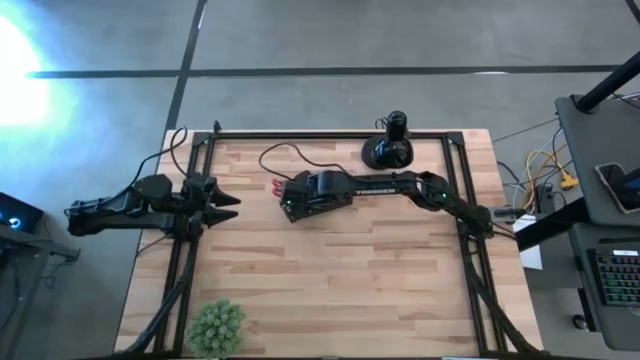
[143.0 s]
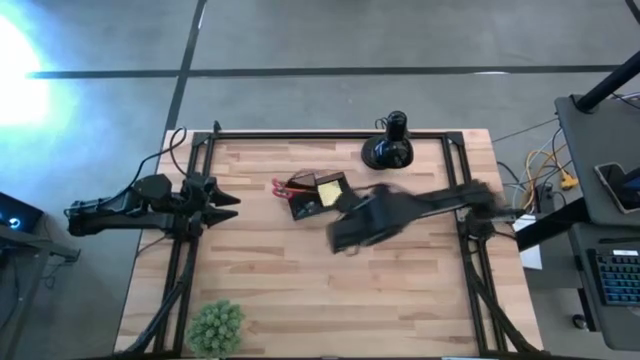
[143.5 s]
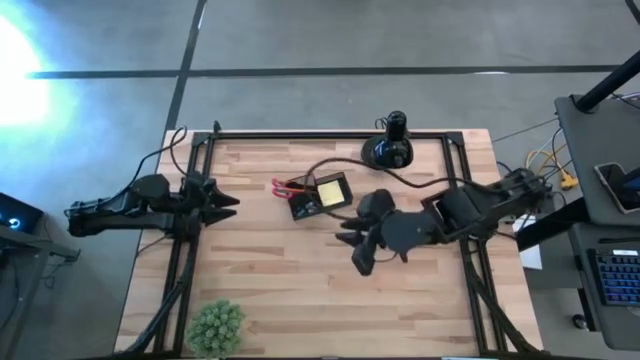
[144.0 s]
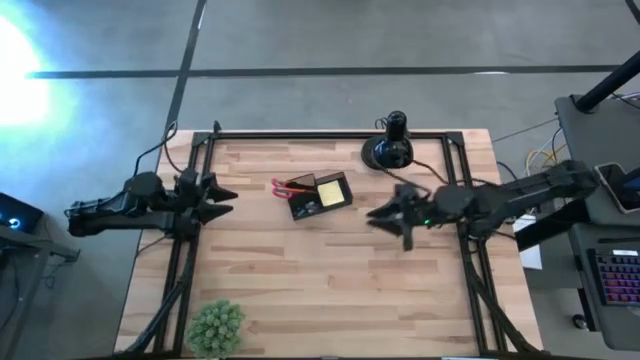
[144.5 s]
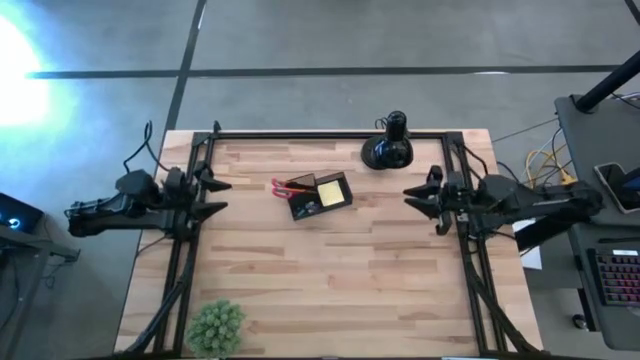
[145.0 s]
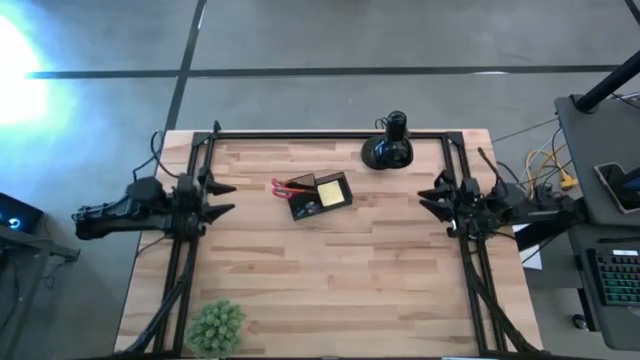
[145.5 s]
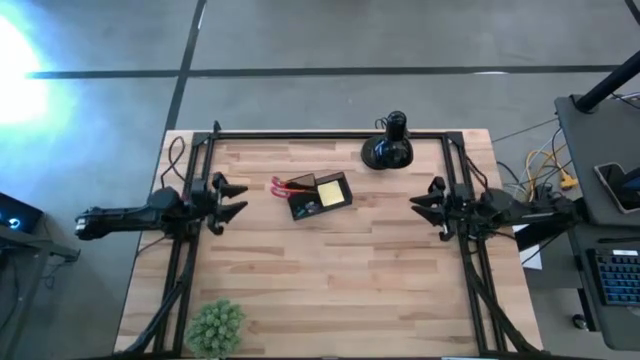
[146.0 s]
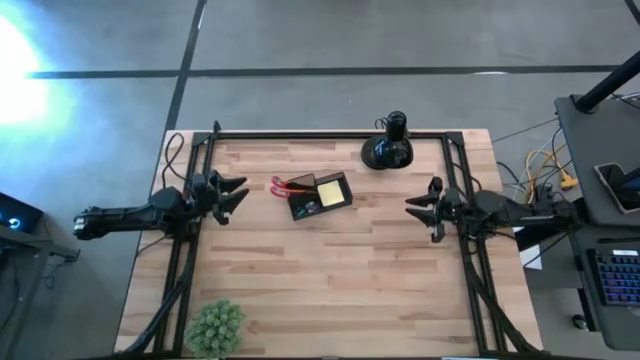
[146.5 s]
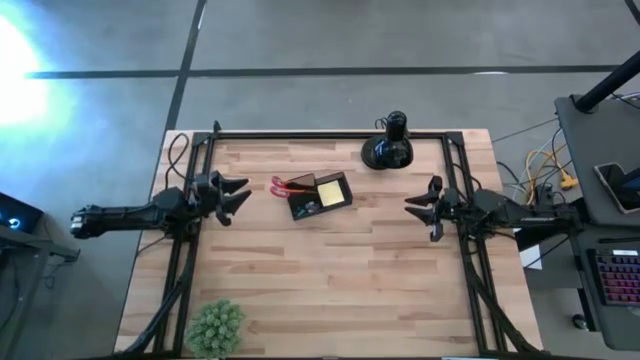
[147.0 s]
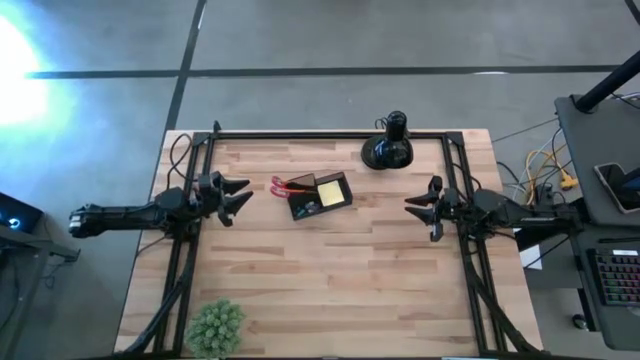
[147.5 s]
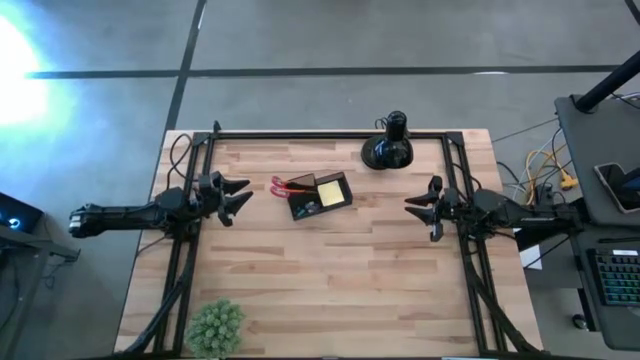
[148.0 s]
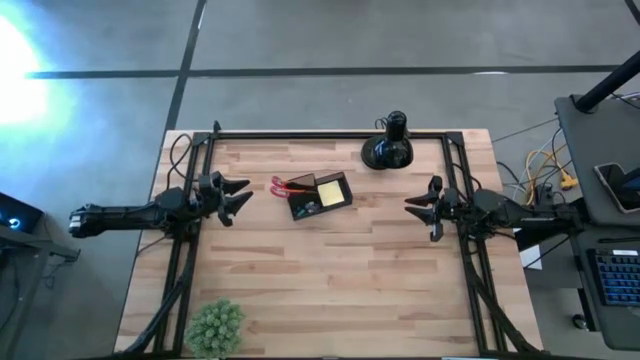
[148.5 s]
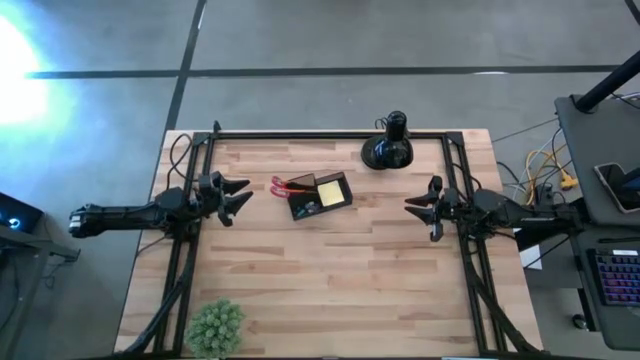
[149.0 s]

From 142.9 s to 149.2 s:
Task: Pick and place office supplies into organizer
Return to Home Position

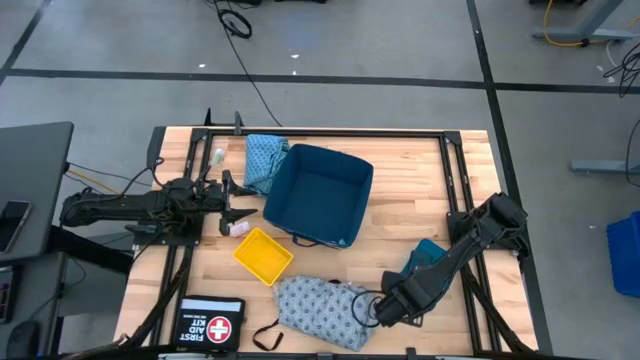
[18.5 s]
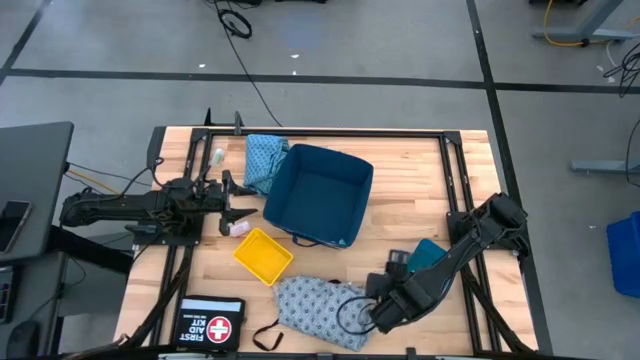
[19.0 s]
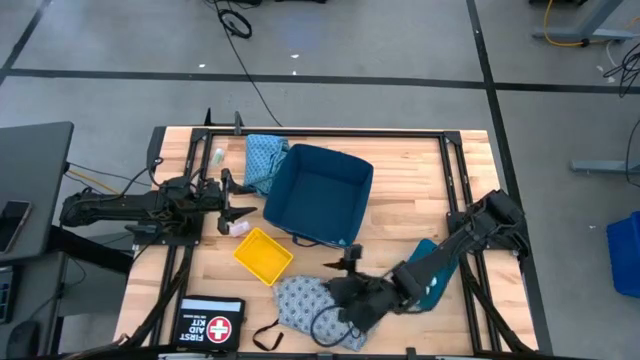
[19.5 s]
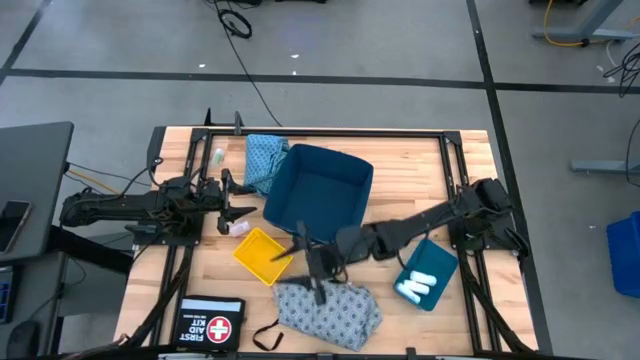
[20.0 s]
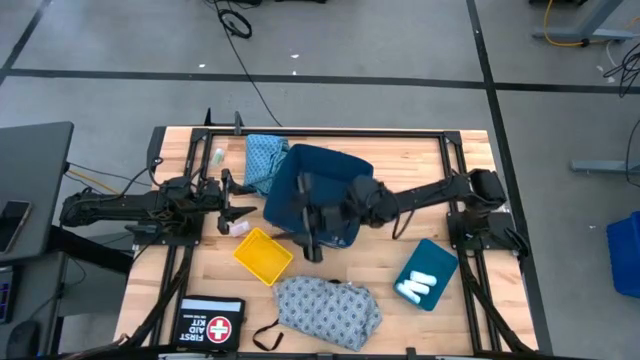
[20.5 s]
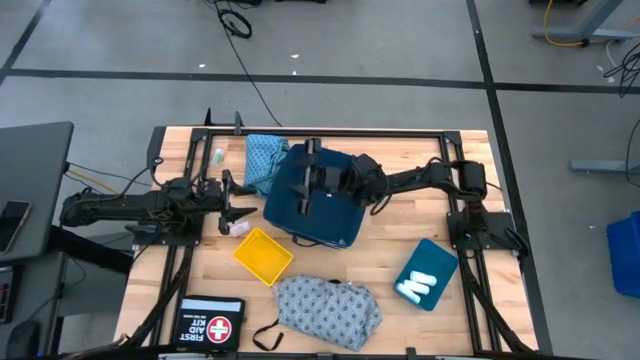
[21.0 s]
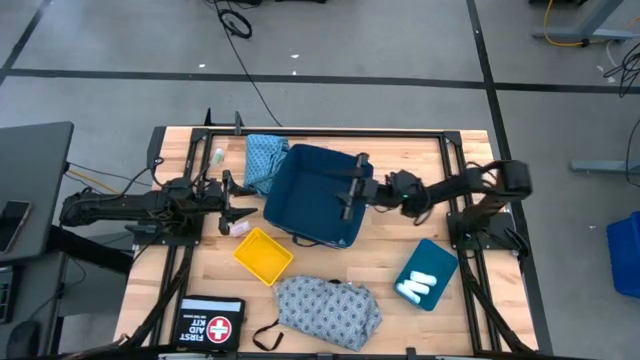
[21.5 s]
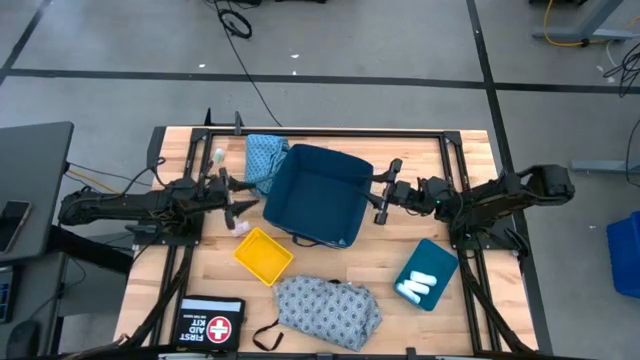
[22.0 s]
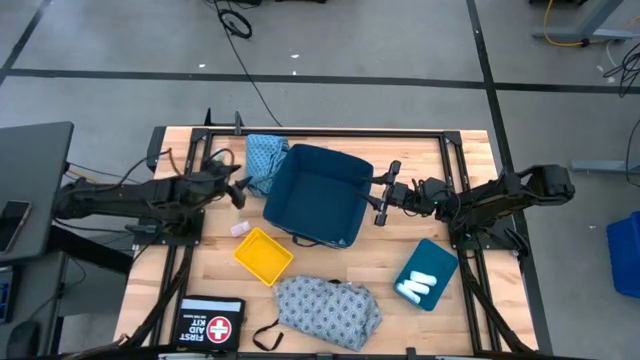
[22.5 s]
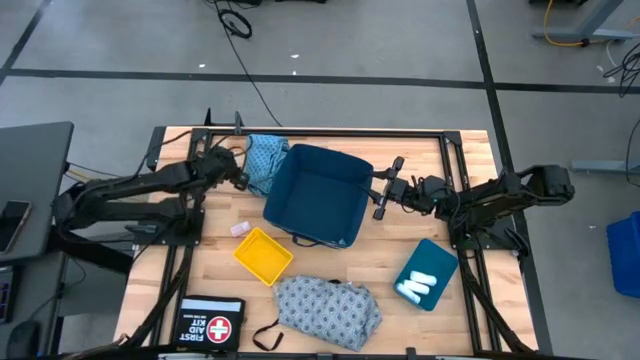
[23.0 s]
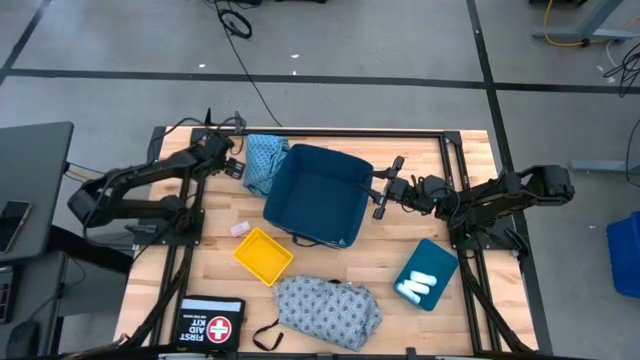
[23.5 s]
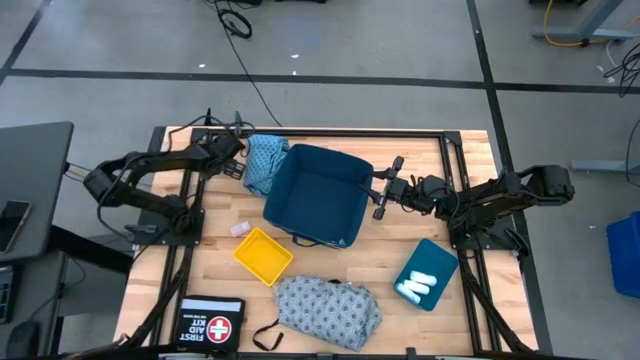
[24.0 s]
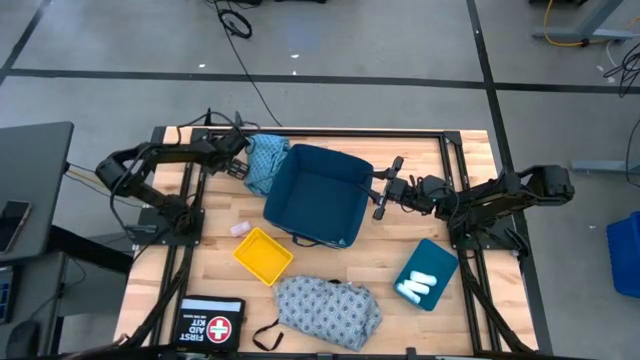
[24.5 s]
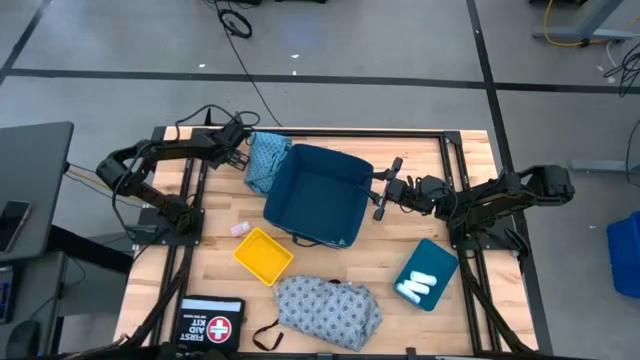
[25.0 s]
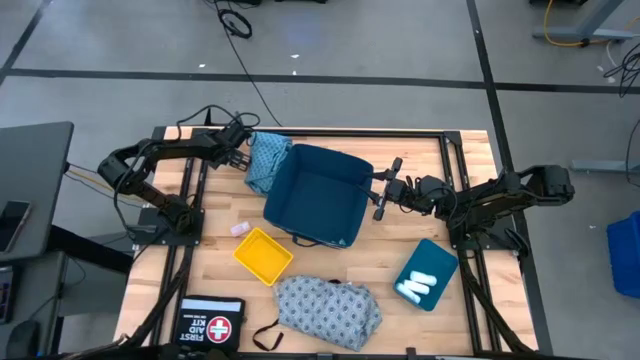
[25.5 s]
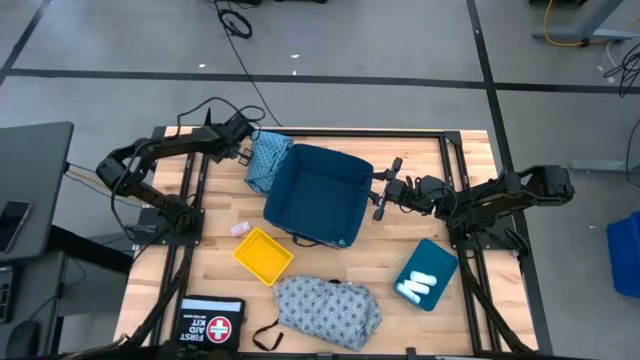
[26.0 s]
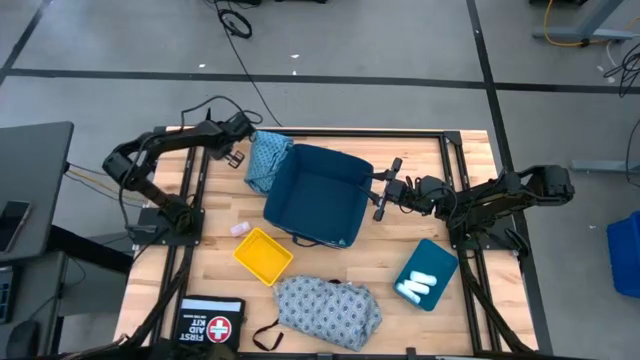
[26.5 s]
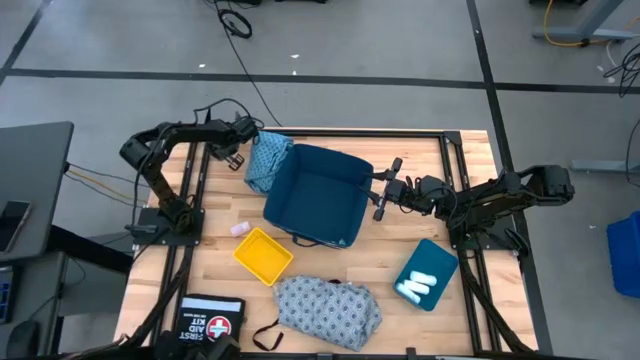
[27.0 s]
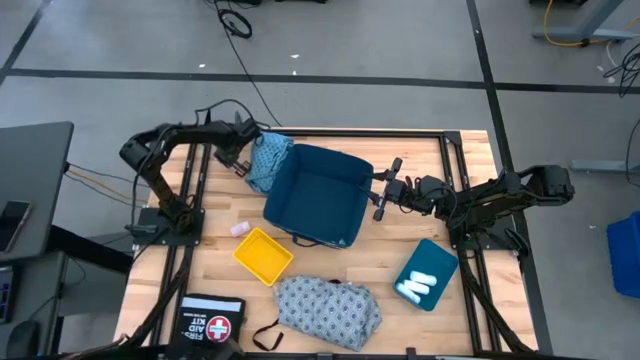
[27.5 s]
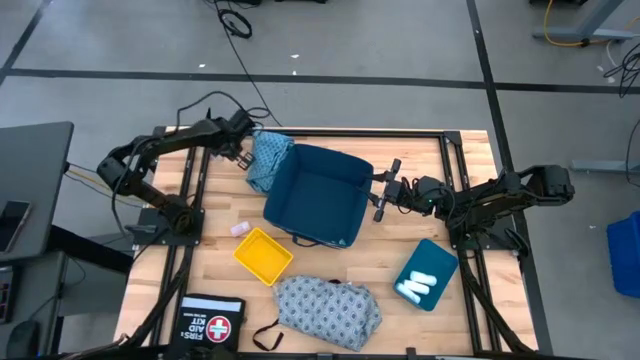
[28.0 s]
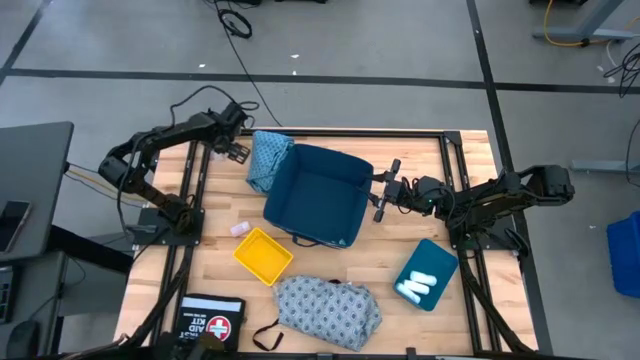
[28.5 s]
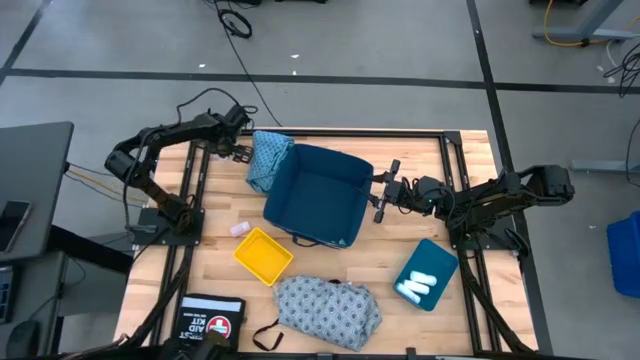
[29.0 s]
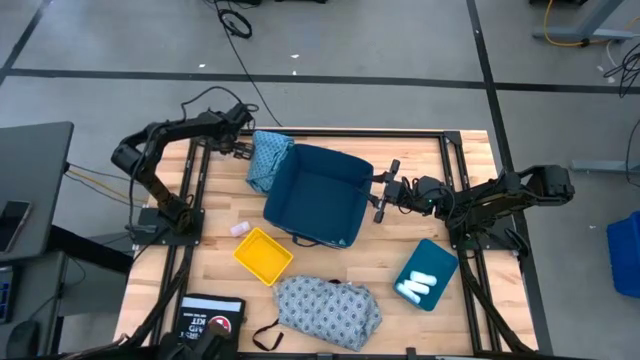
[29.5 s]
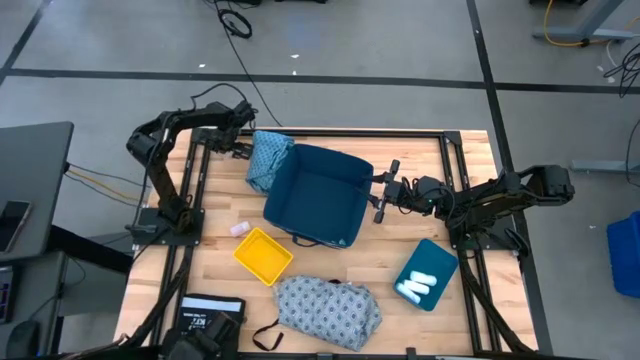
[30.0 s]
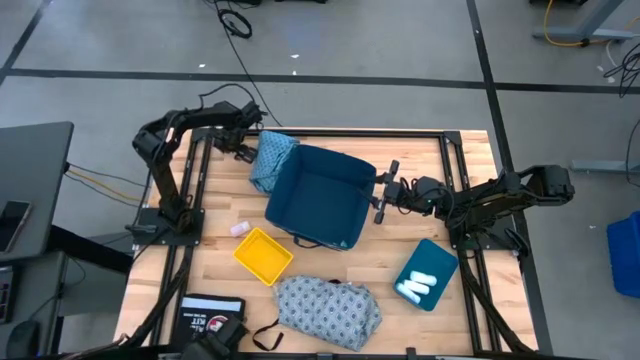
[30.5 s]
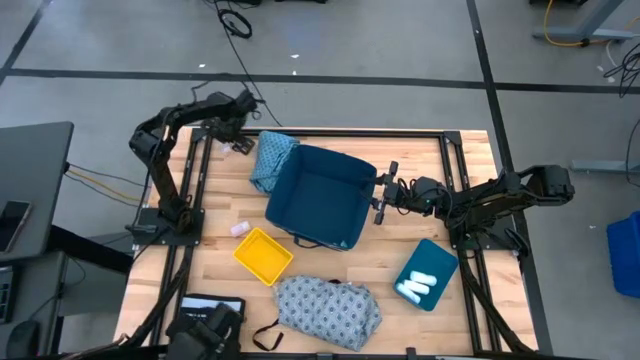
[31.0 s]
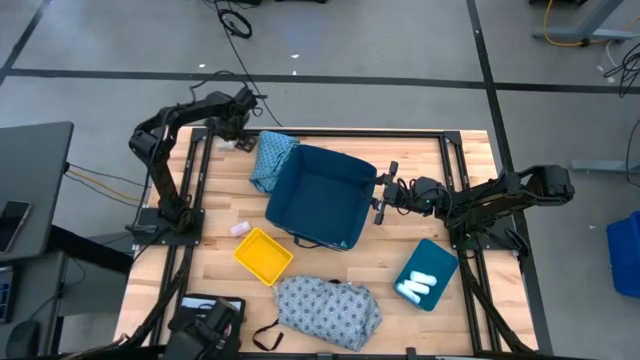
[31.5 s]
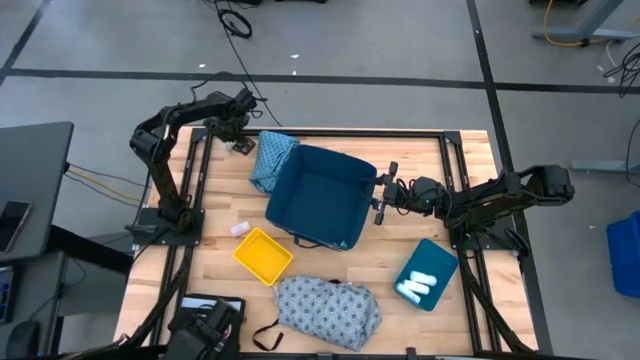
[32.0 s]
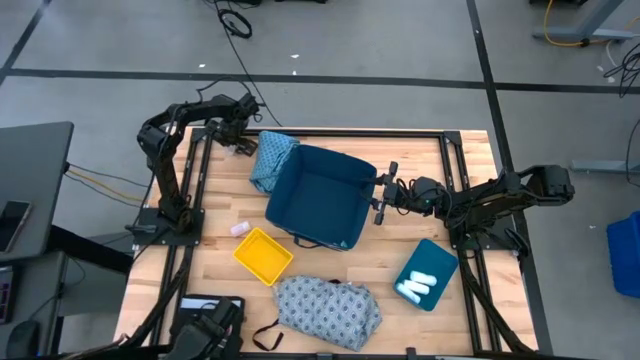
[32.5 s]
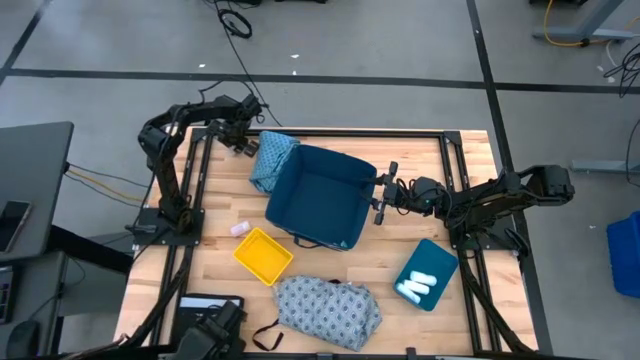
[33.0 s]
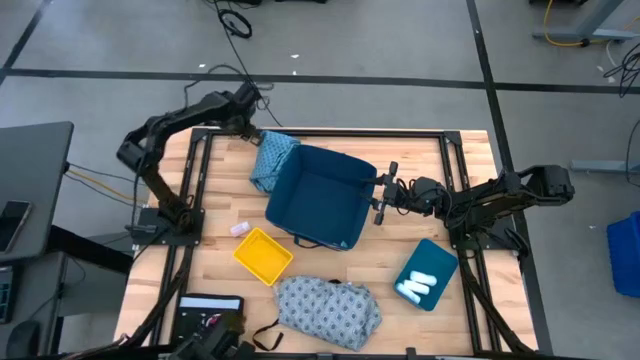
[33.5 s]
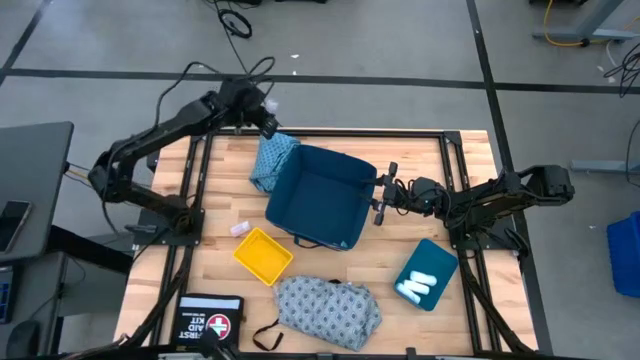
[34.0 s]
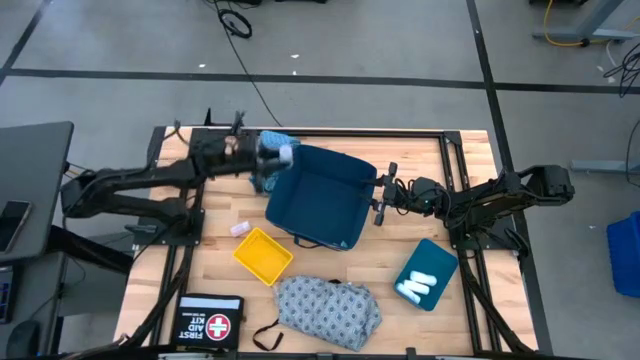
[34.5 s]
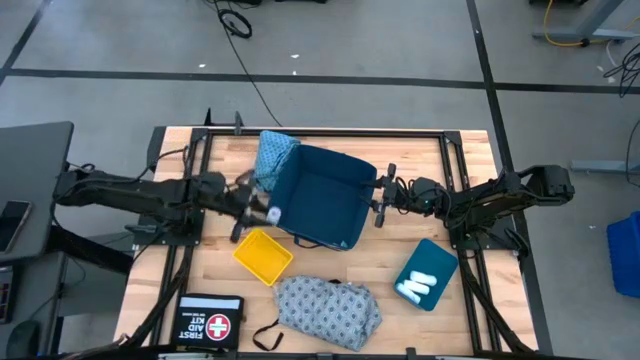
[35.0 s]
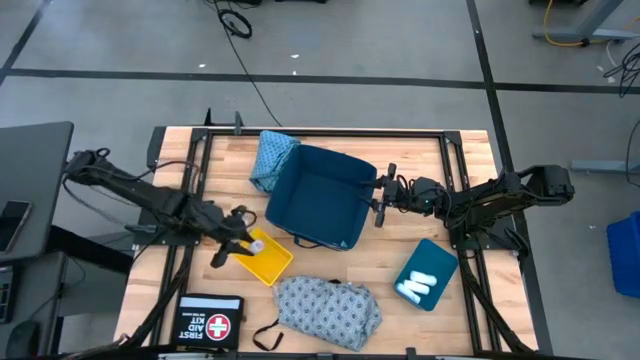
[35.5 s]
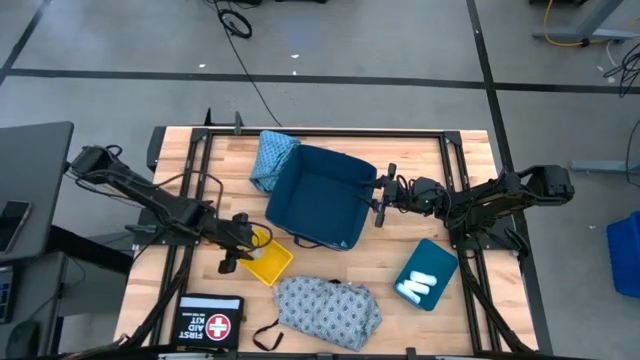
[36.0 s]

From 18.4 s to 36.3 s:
Task: Pick & place medical supplies in basket/bin
Put the top left transparent pill bottle into the yellow bin
